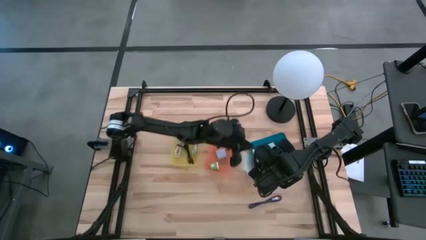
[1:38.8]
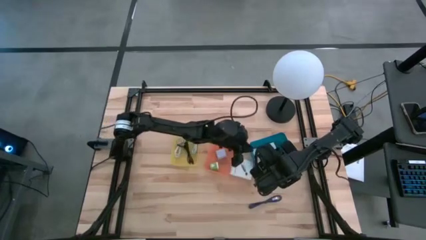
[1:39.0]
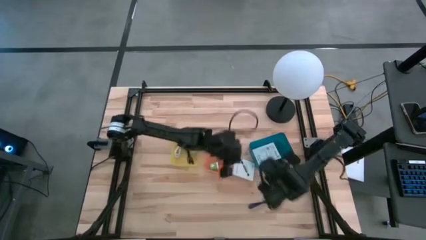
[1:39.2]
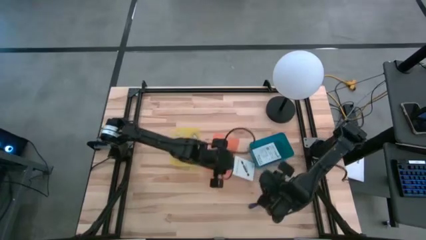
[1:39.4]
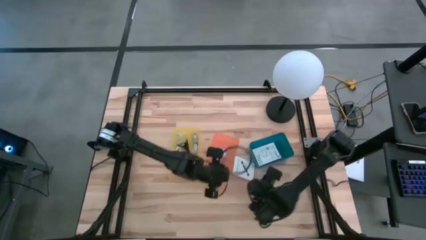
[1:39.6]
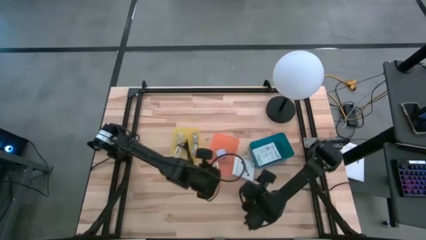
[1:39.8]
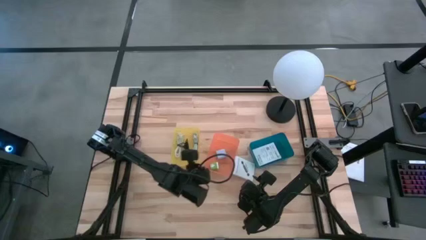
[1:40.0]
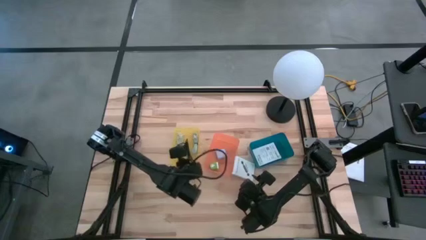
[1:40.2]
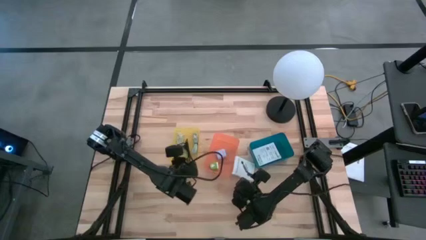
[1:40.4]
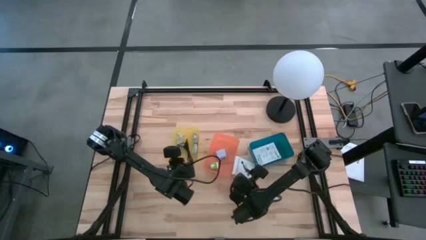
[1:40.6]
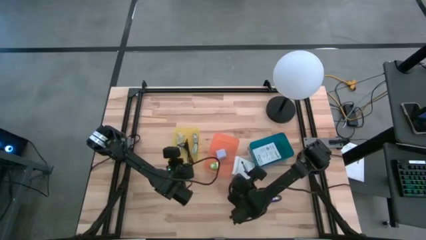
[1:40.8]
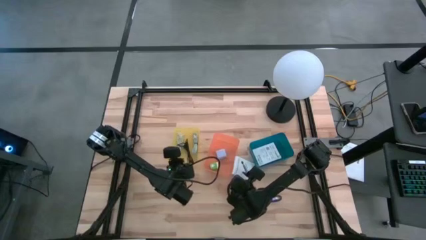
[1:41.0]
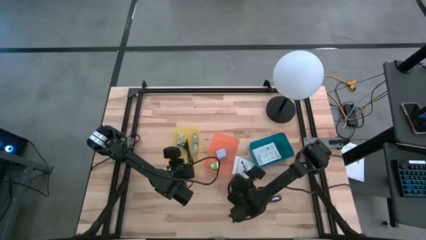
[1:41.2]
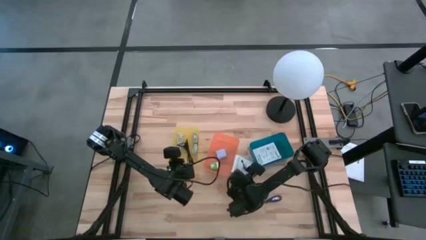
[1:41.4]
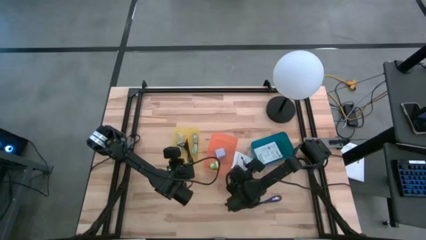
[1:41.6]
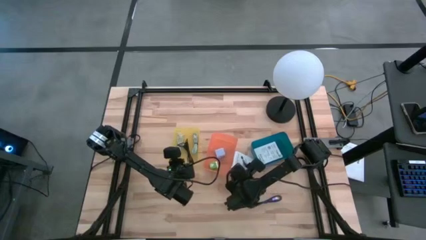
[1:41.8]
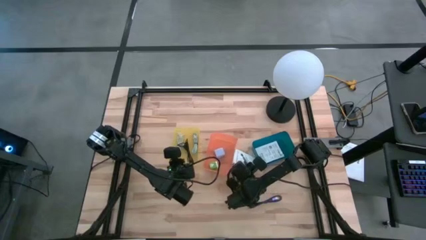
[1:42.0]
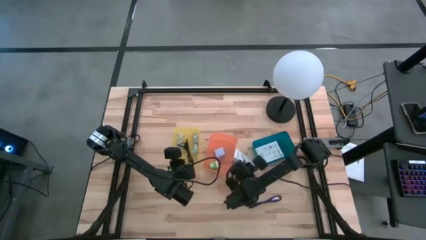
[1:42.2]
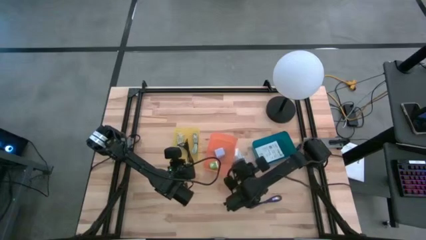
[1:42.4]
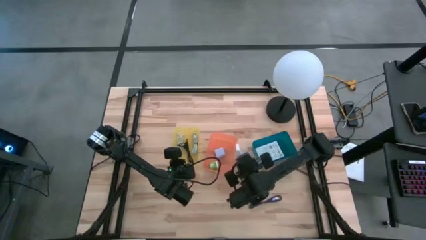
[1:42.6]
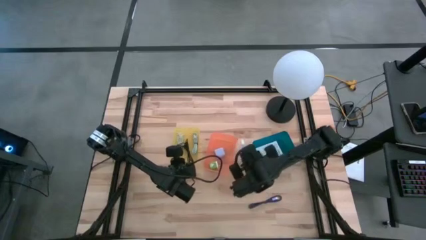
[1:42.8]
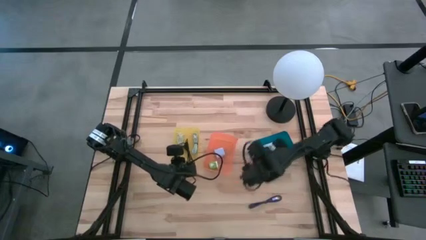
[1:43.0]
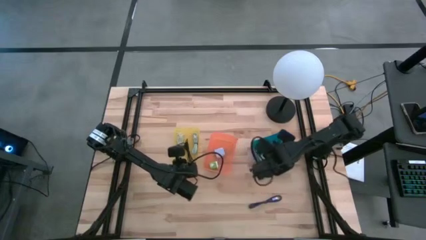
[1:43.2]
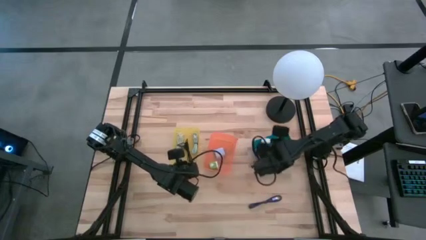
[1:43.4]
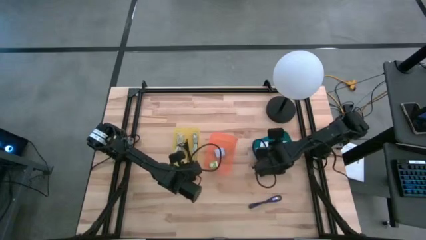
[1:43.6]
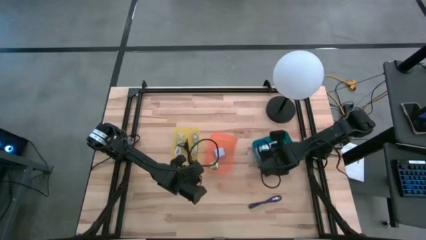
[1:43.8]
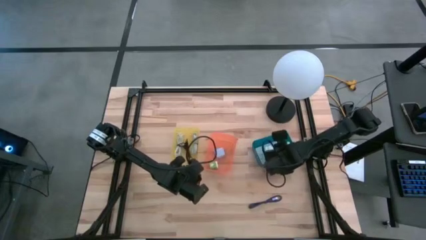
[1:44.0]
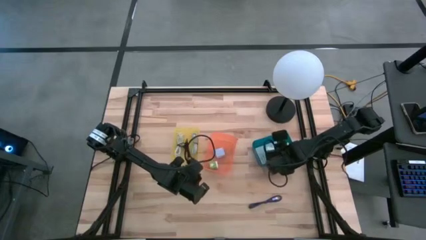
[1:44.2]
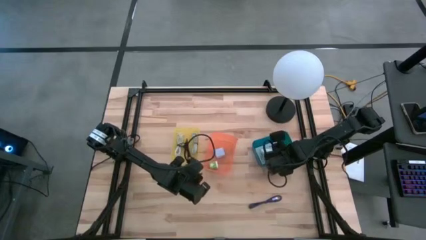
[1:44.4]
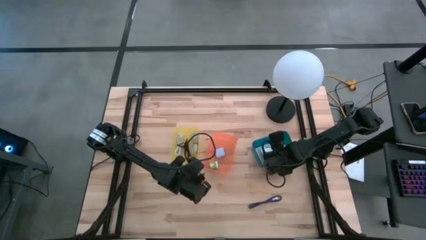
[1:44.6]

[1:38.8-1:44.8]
Task: Pick and place items into bin
Put the top white card reader box into the blue bin

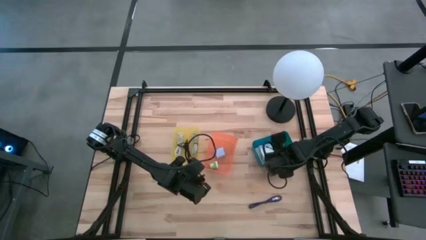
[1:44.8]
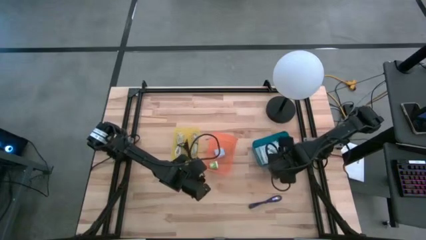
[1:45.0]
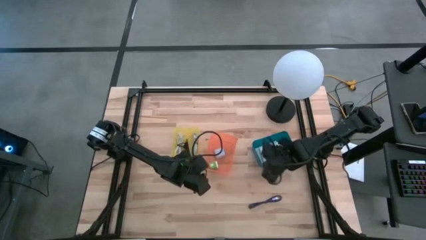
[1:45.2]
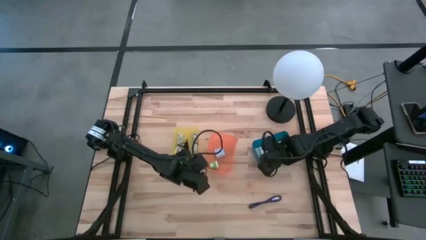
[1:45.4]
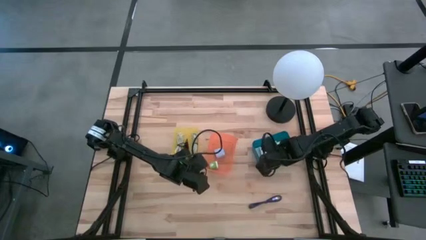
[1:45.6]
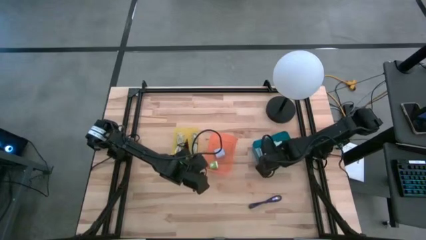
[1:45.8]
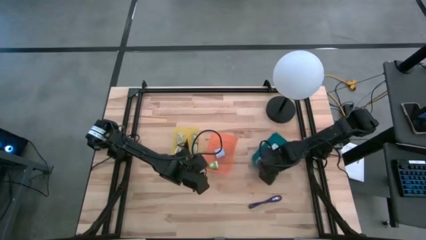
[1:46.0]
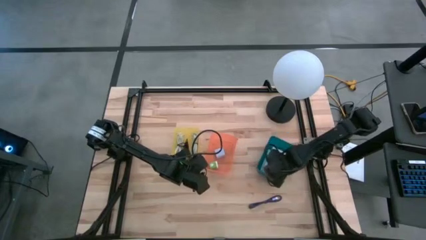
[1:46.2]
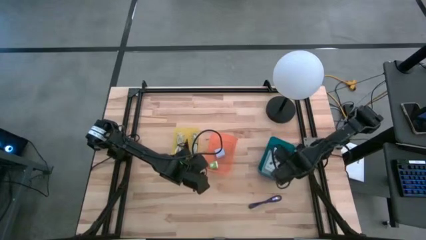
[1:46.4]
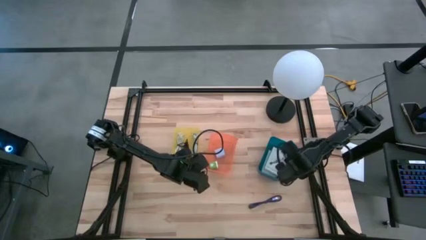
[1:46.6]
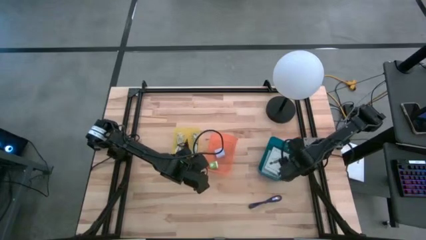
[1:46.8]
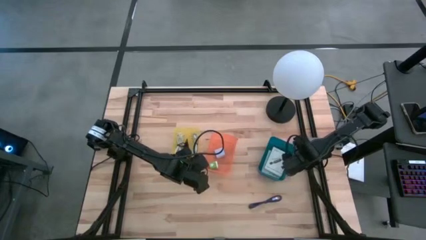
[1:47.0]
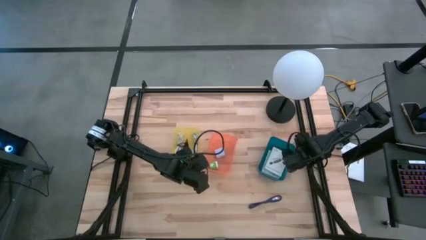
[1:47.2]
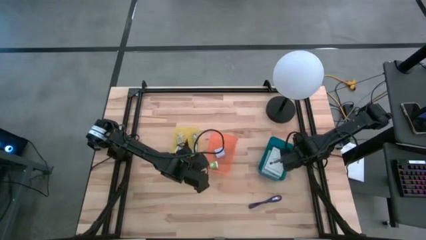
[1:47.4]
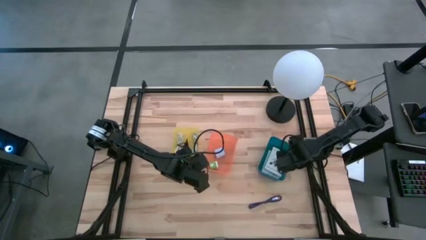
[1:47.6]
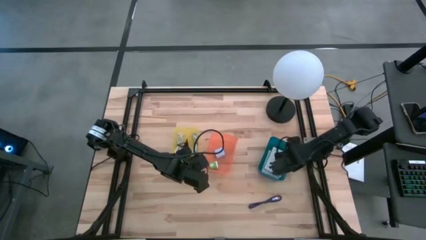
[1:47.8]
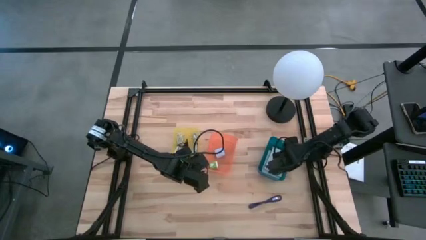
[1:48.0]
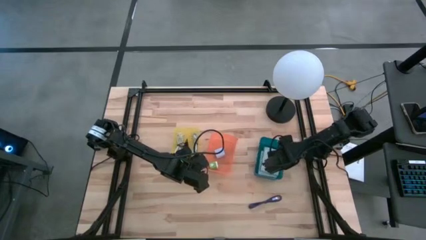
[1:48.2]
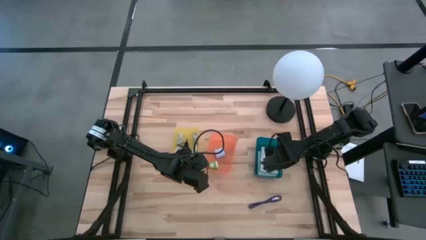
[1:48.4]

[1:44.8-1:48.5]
Adjust the blue bin on the table

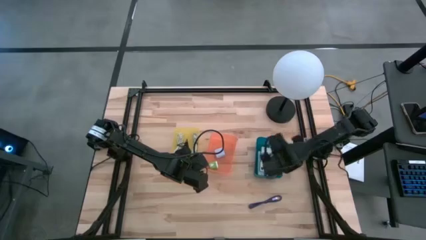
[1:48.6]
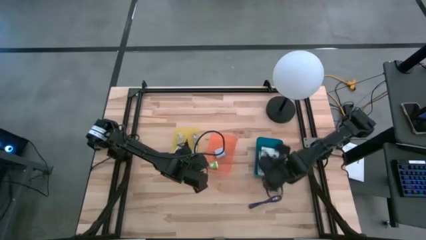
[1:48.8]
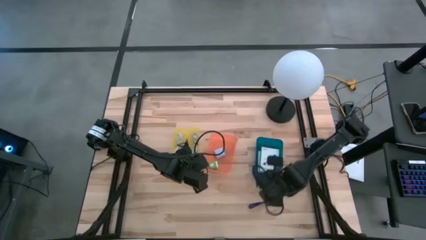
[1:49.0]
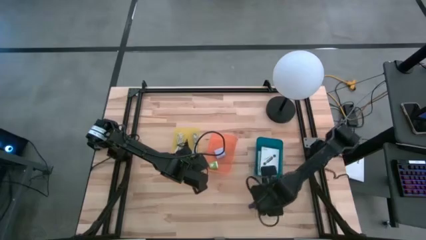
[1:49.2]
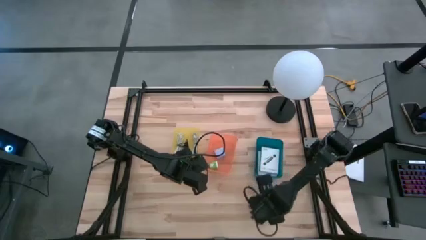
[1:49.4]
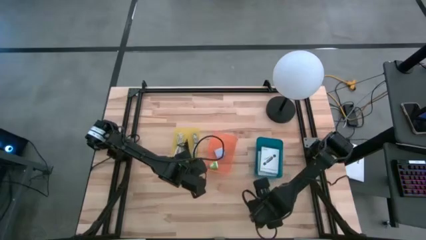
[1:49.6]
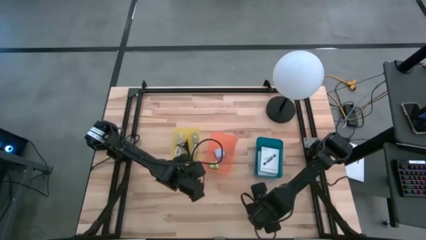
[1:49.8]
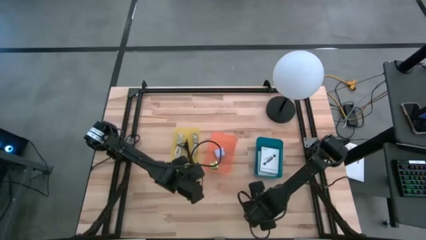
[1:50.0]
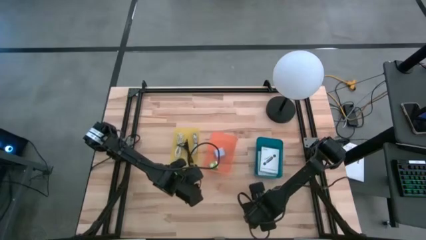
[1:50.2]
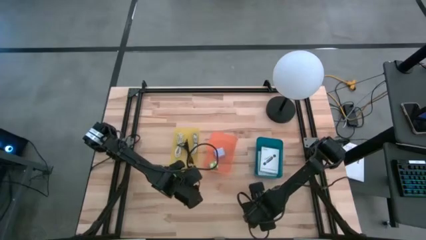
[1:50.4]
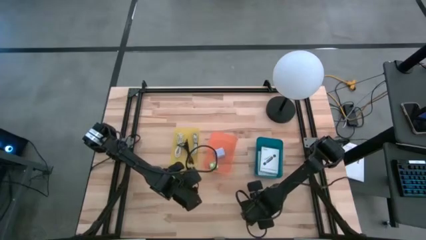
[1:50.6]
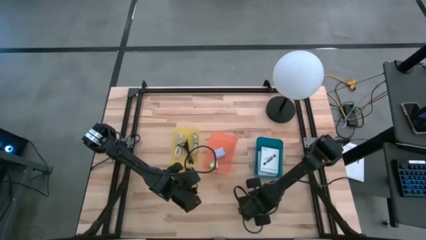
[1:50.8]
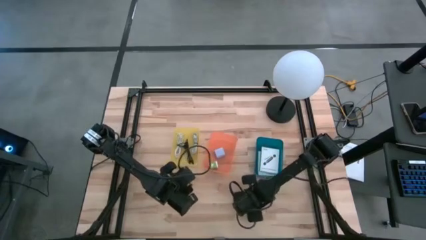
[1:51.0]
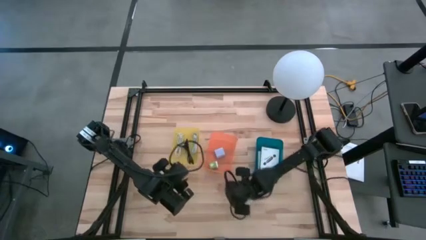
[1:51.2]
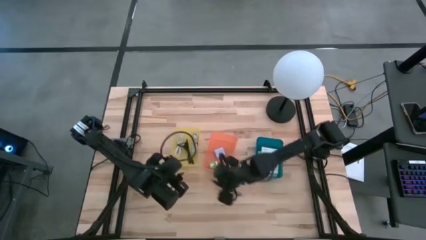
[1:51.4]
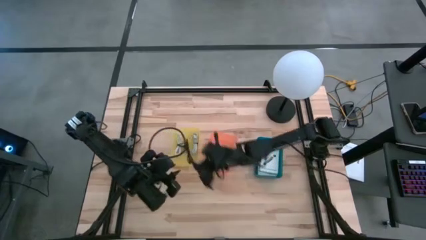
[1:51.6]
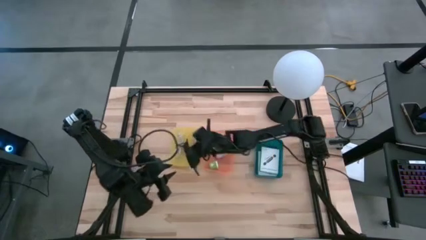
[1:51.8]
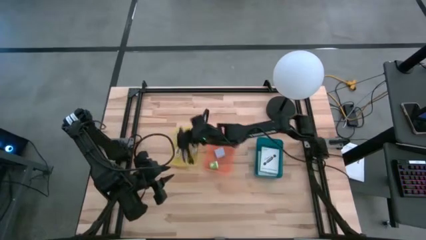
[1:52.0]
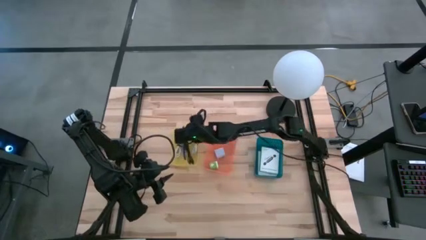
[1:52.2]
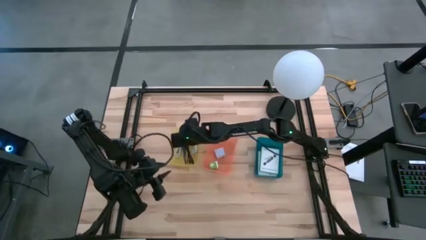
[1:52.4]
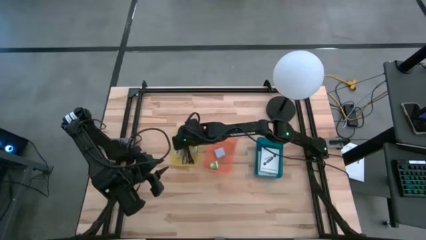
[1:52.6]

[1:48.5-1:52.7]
Put the blue charger cable into the yellow bin

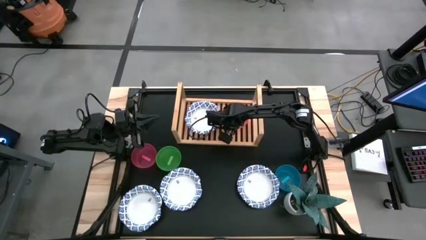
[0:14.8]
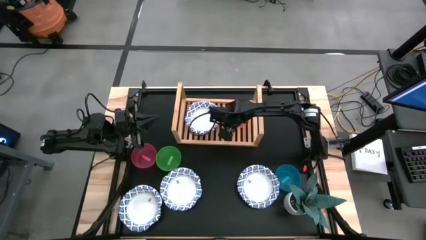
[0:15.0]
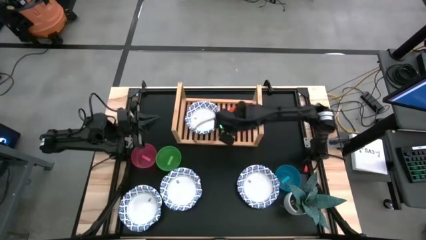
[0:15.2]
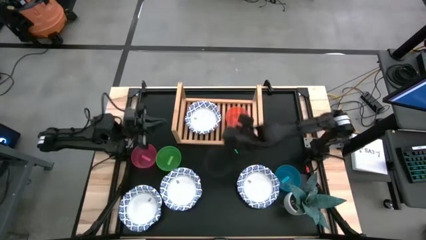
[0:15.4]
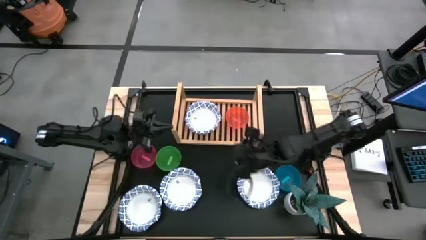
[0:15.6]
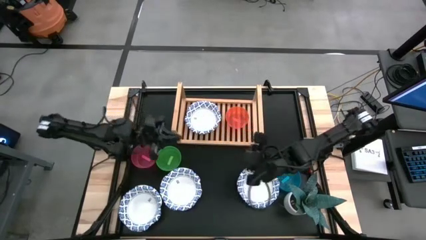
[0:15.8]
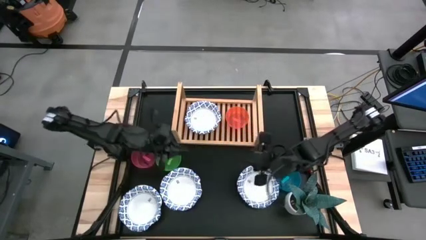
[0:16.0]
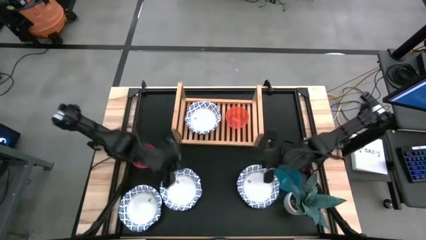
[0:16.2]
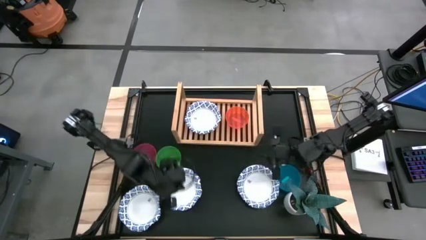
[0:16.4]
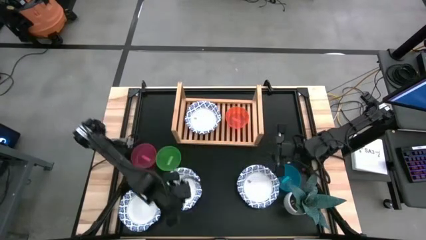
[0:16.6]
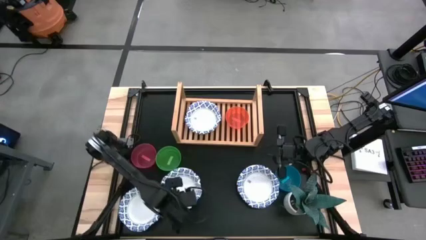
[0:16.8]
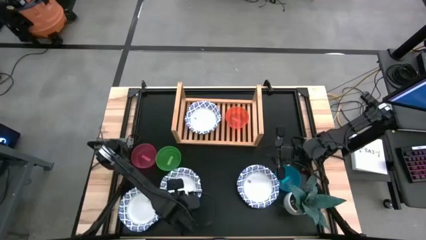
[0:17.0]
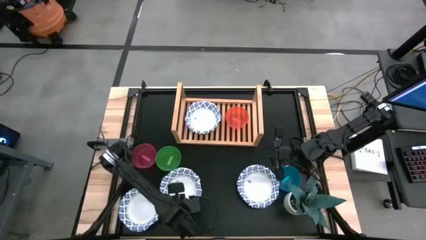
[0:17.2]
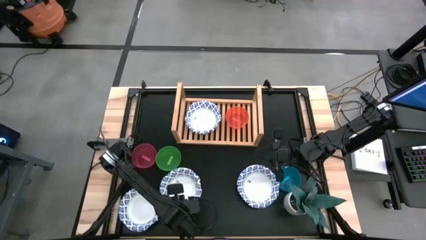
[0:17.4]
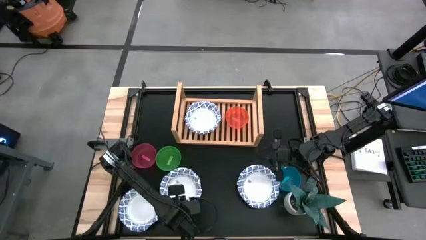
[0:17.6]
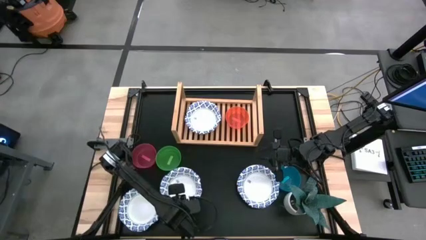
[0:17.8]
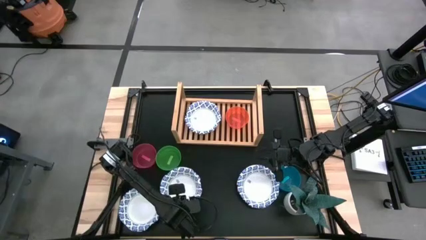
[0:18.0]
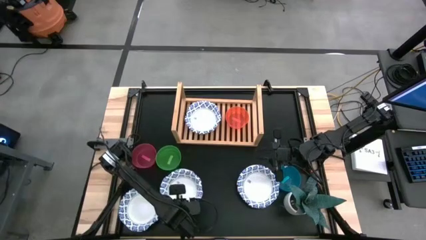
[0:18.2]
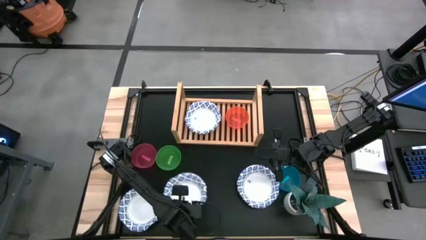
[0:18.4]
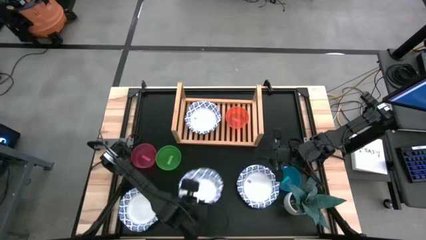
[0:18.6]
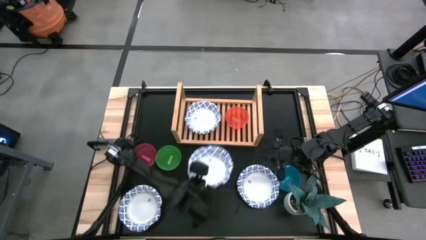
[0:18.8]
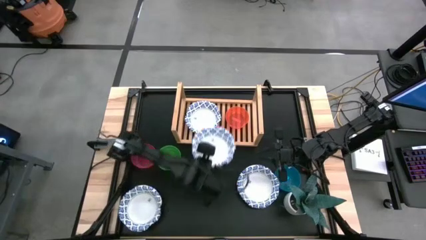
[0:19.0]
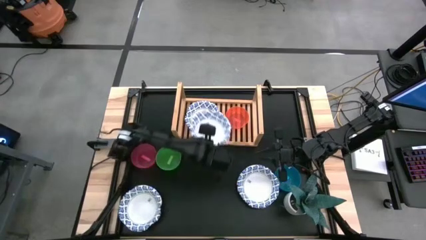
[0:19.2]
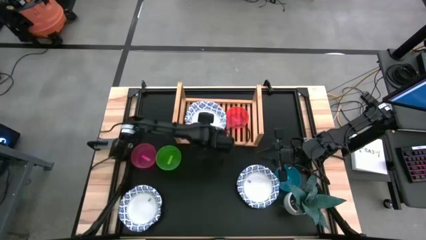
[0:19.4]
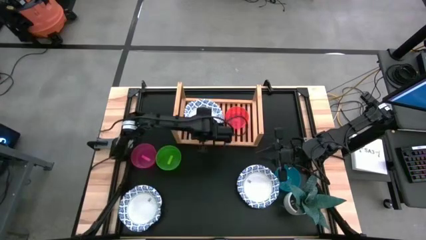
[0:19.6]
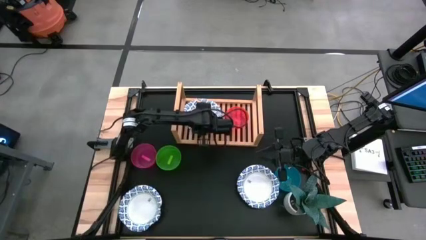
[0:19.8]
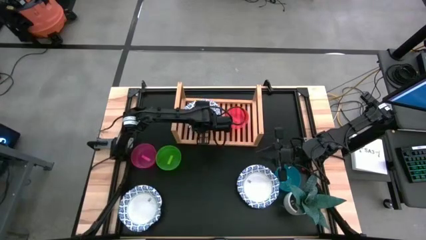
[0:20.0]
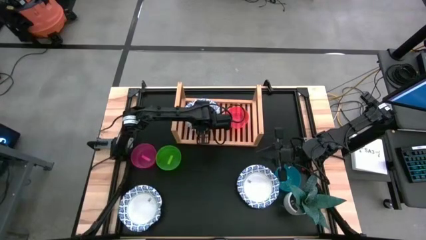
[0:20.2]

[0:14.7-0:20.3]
Task: Place and stack bowls onto a shelf
Stack the large white bowl on top of the large white bowl on the shelf
